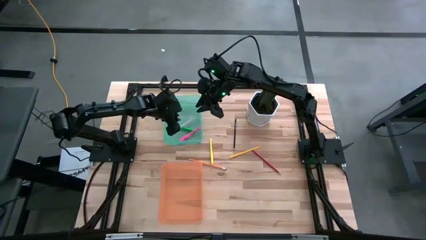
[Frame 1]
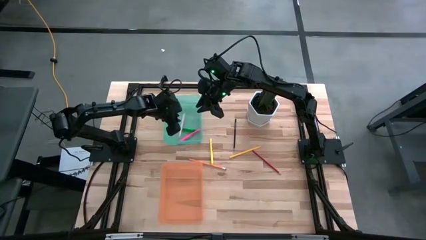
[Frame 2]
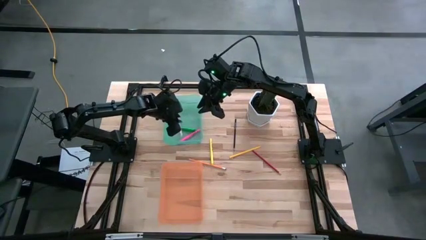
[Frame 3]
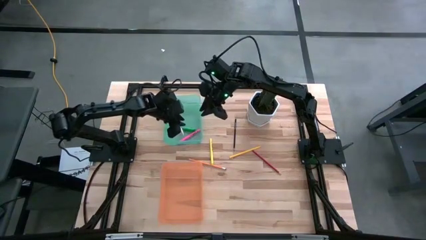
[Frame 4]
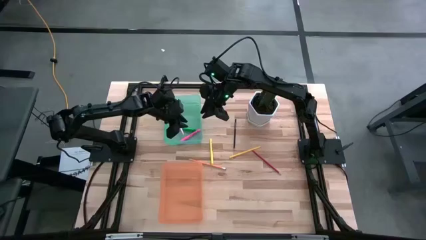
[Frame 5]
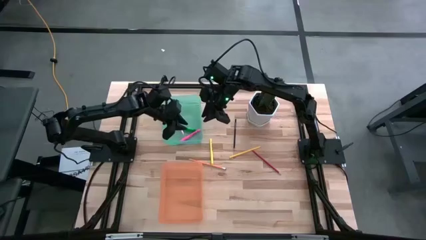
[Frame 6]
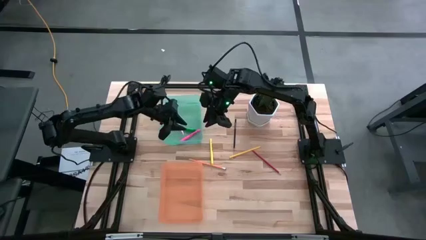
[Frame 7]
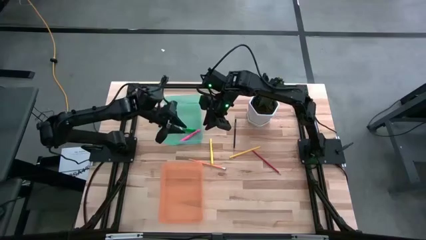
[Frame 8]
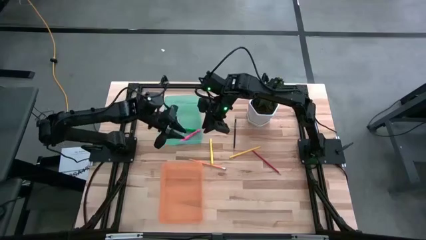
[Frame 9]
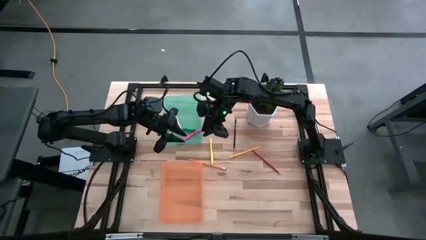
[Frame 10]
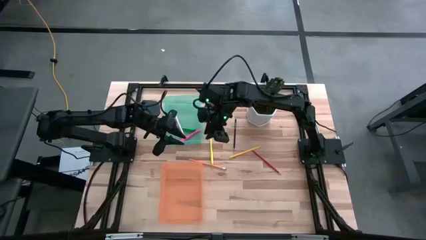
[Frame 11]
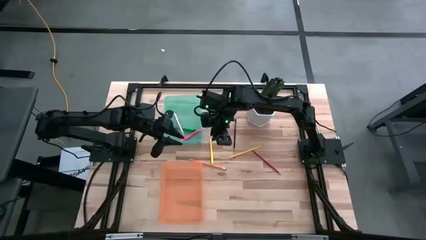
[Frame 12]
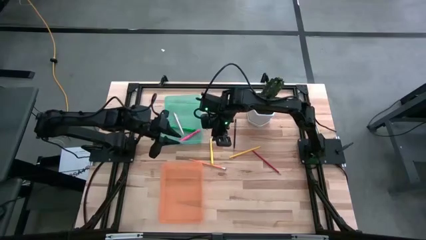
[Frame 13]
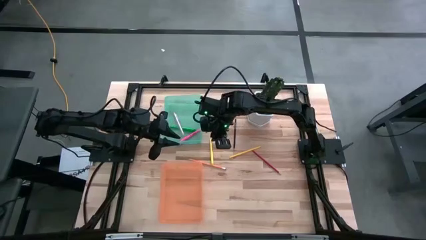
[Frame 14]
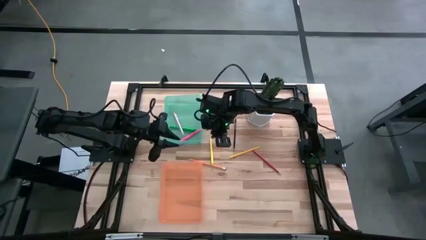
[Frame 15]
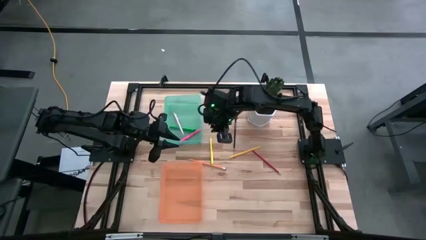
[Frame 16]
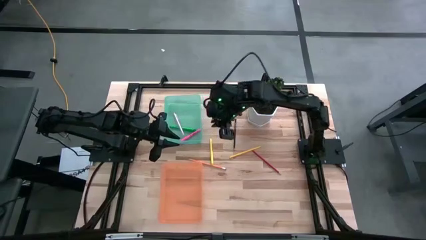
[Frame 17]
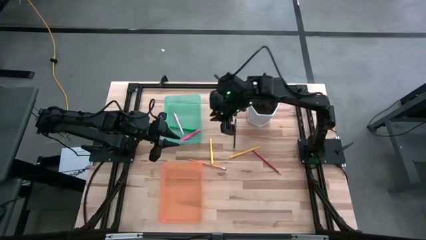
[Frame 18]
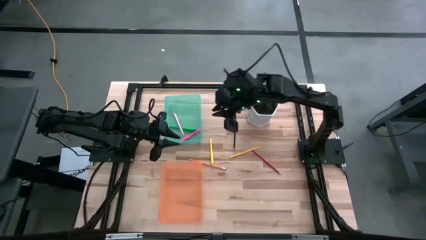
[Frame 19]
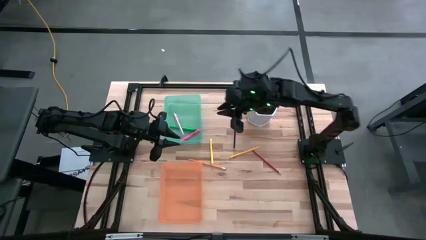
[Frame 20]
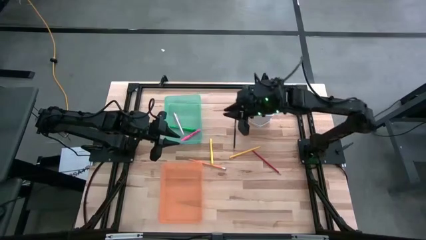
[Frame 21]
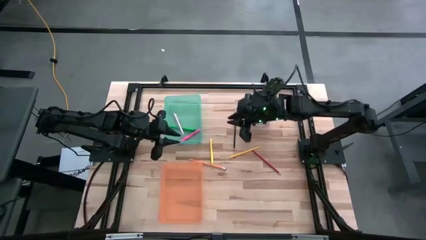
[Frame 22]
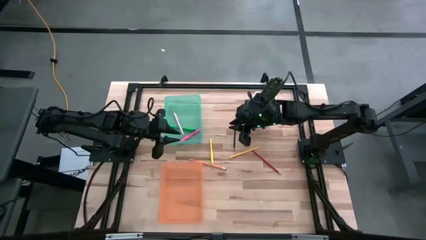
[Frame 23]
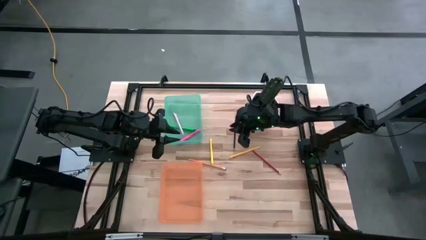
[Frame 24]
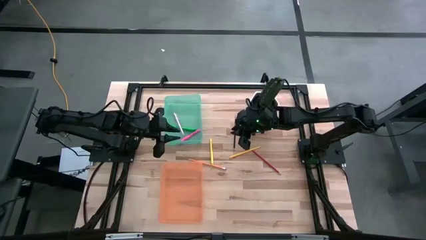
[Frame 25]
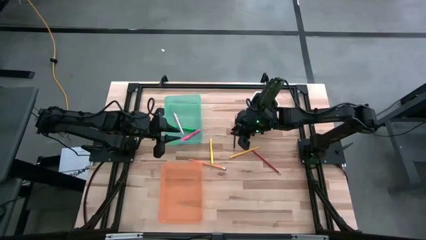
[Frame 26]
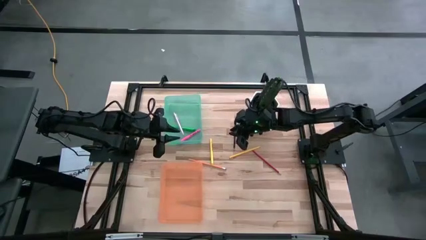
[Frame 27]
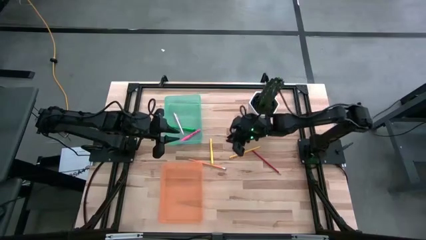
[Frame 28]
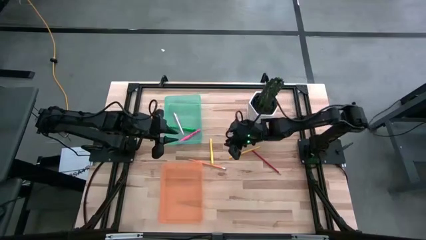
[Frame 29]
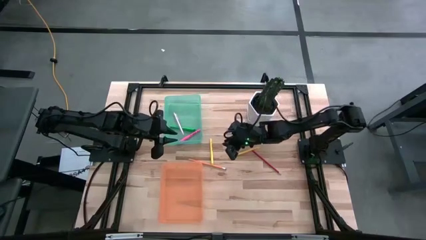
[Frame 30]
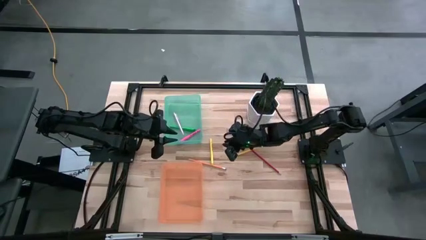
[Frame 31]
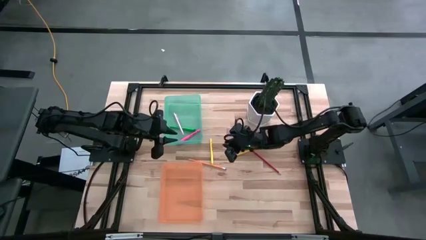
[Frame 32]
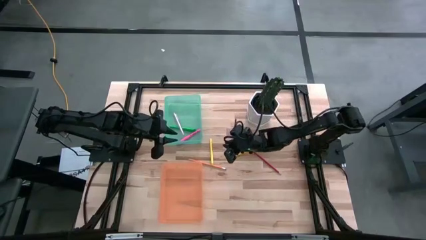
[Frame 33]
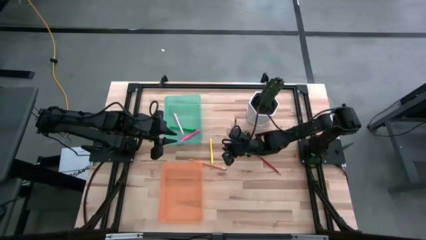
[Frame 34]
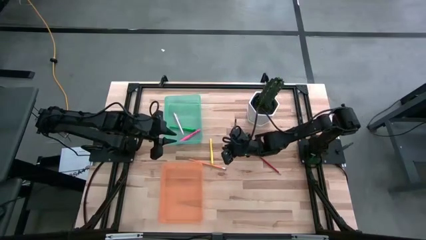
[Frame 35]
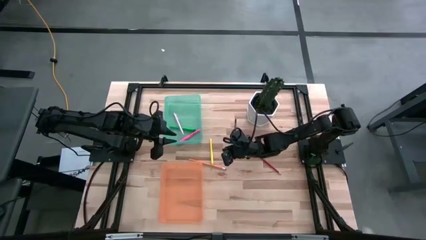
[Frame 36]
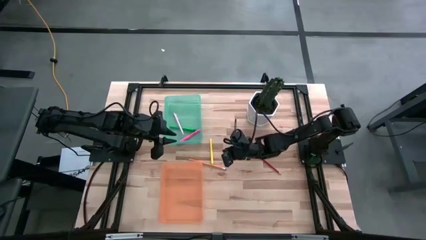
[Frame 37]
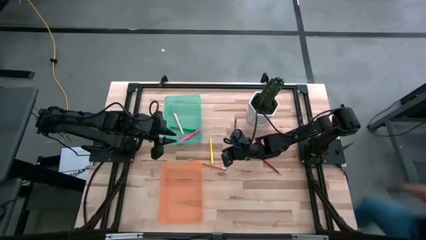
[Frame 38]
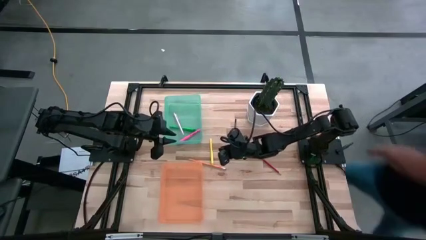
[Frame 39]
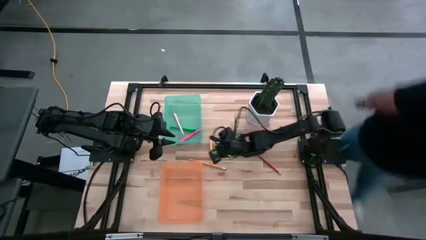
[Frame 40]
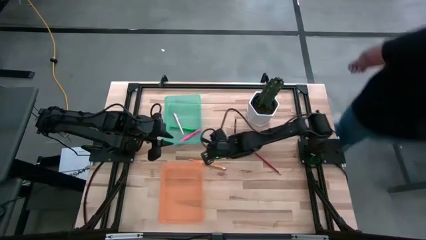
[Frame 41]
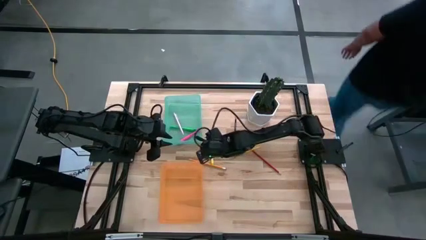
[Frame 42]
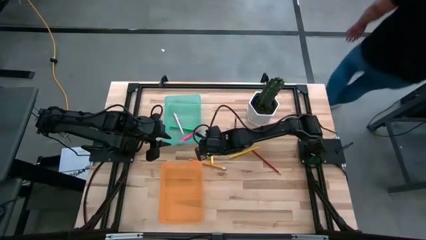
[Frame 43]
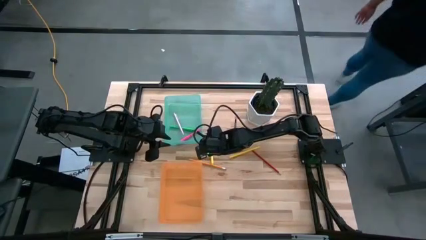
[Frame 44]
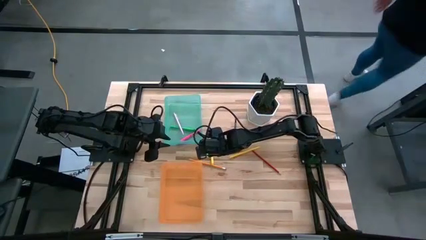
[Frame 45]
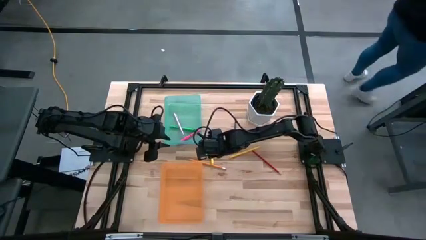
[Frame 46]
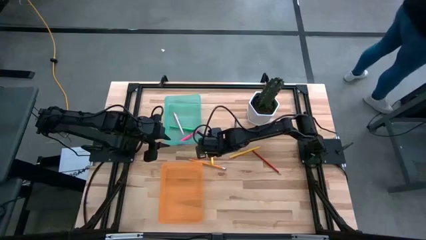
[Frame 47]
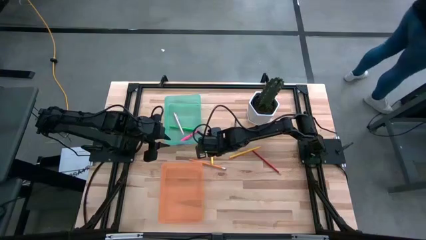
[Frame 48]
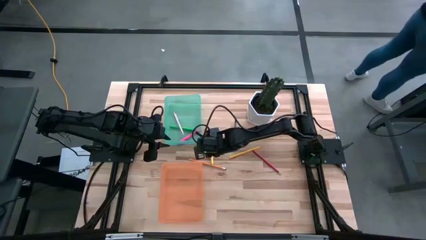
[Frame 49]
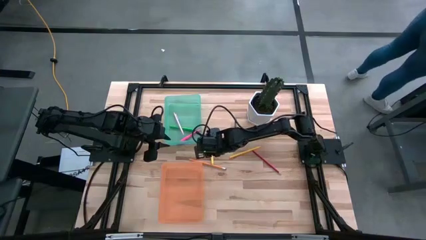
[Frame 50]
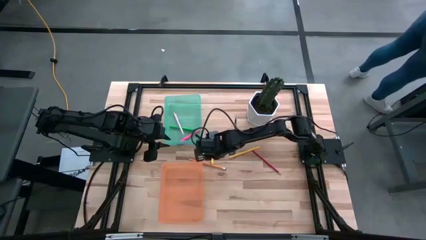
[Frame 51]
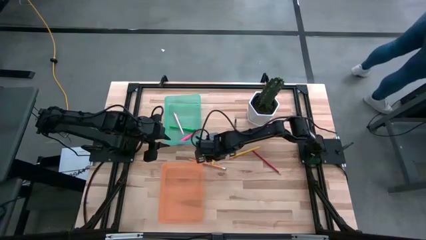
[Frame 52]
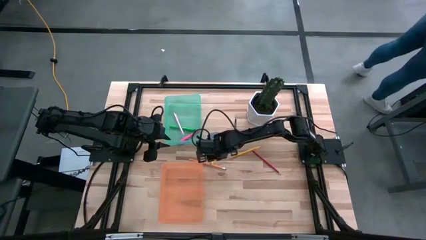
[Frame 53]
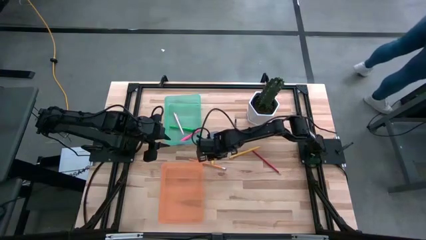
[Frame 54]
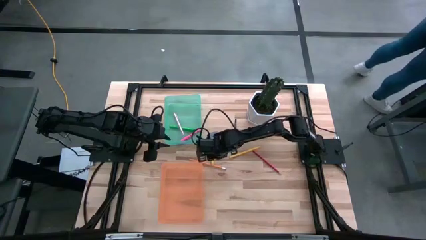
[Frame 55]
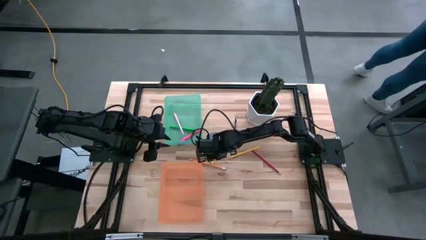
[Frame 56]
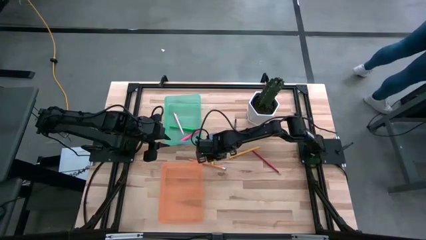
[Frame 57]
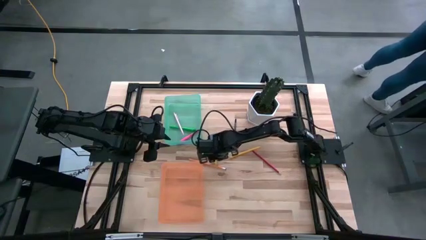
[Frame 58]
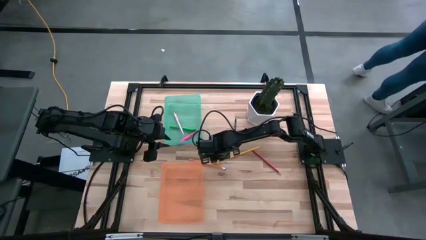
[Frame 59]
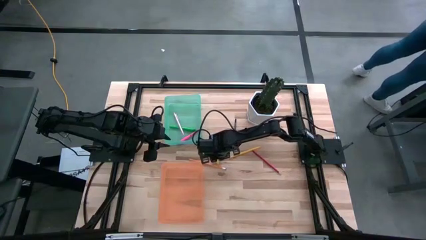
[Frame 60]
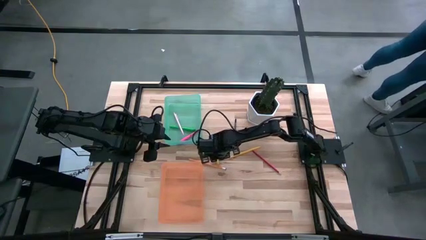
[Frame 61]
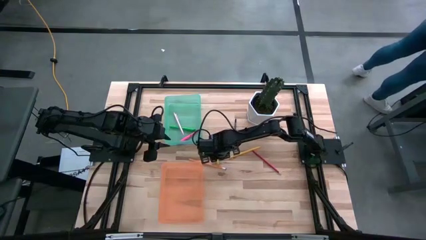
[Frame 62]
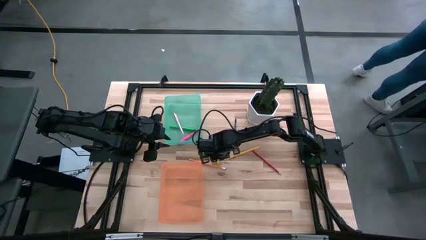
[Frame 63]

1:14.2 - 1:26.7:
Task: Sort pens & pencils
Put the yellow pen into the green bin
